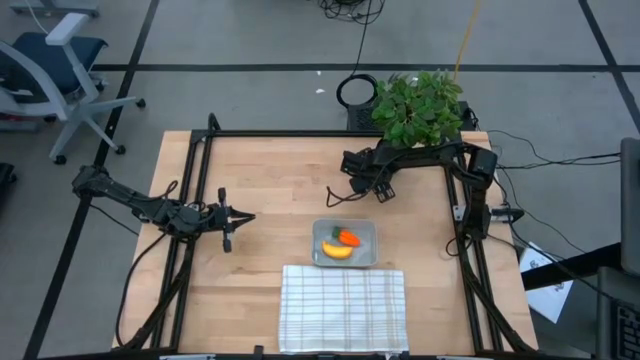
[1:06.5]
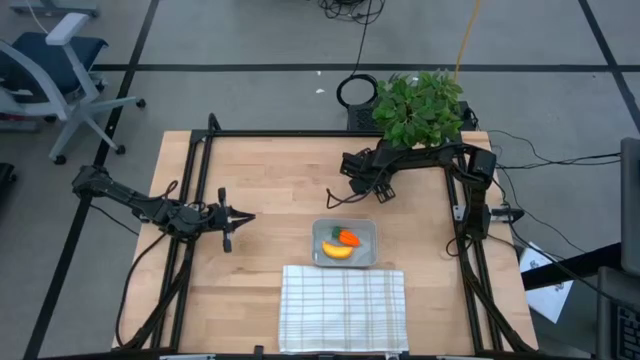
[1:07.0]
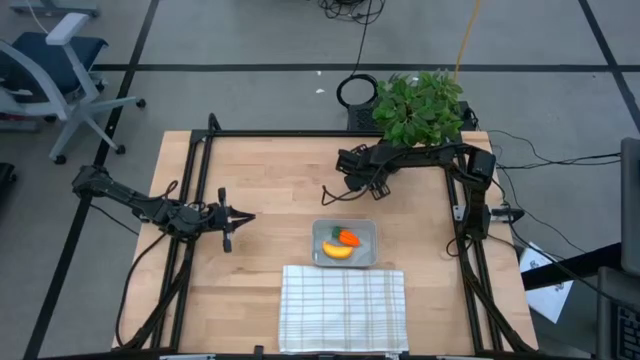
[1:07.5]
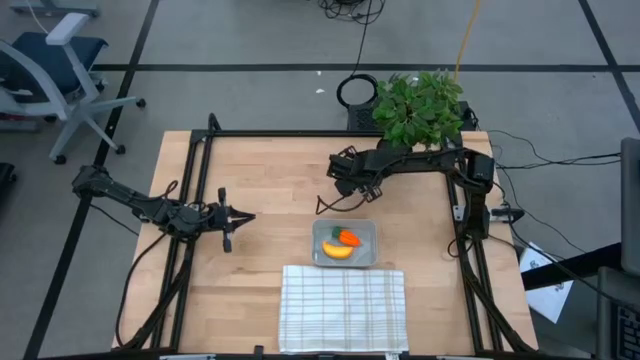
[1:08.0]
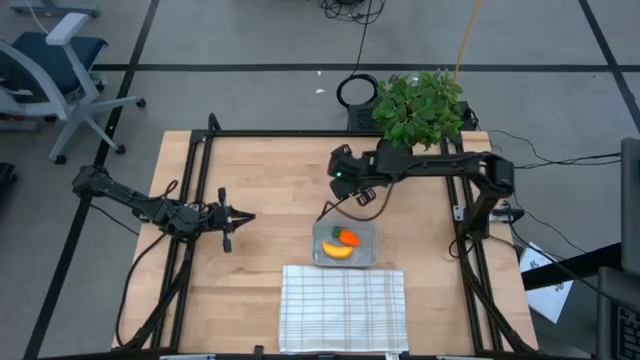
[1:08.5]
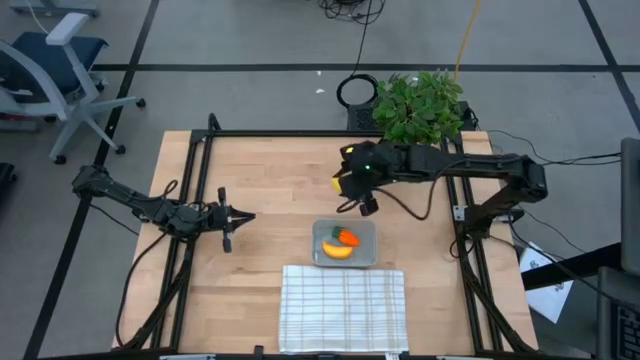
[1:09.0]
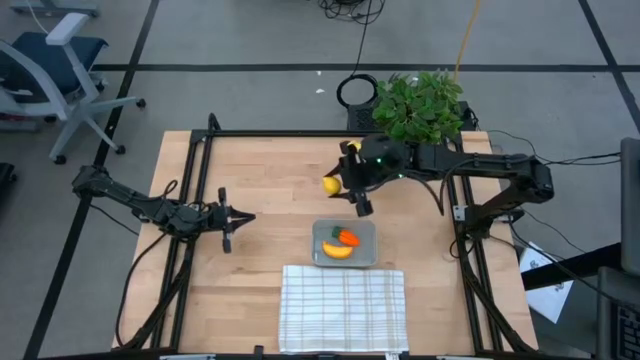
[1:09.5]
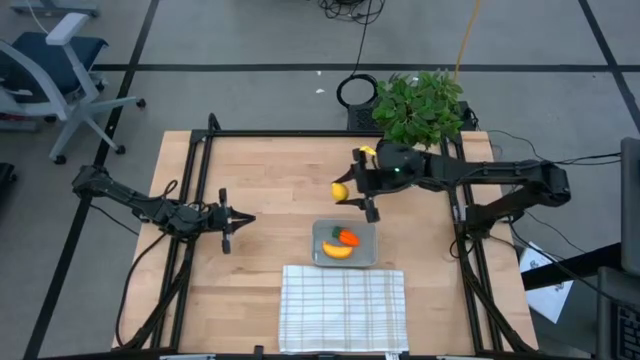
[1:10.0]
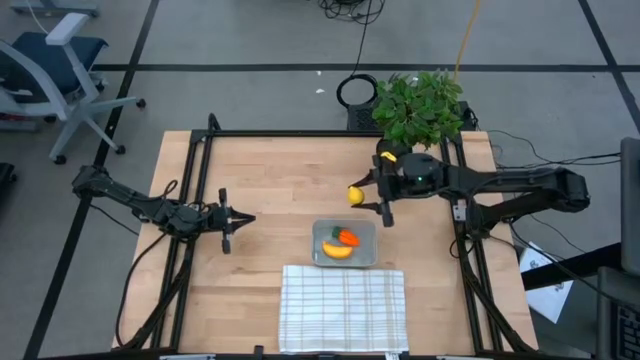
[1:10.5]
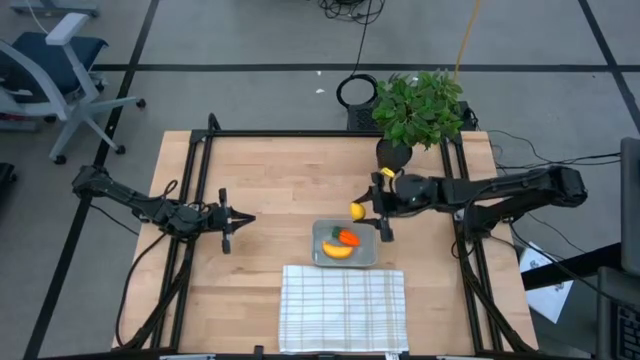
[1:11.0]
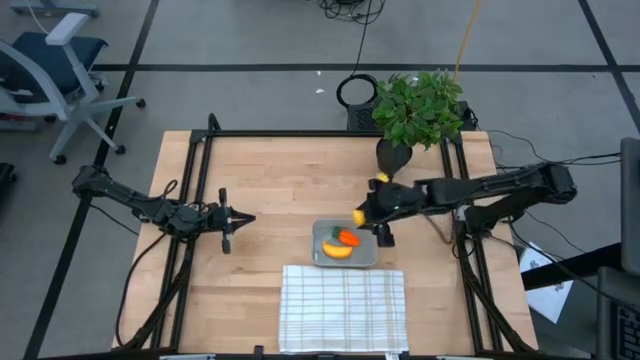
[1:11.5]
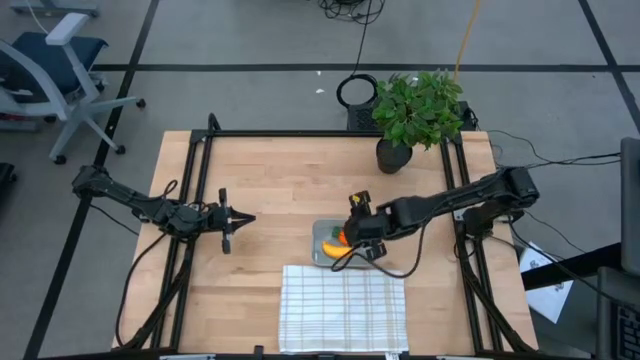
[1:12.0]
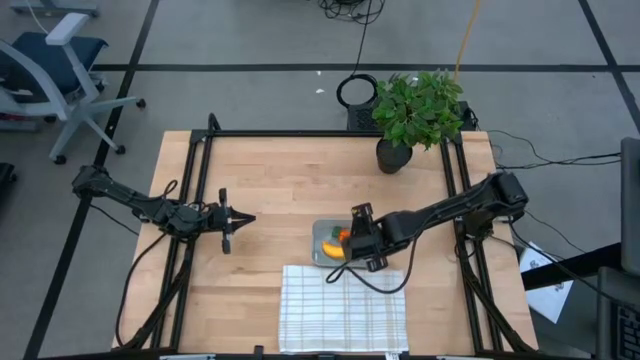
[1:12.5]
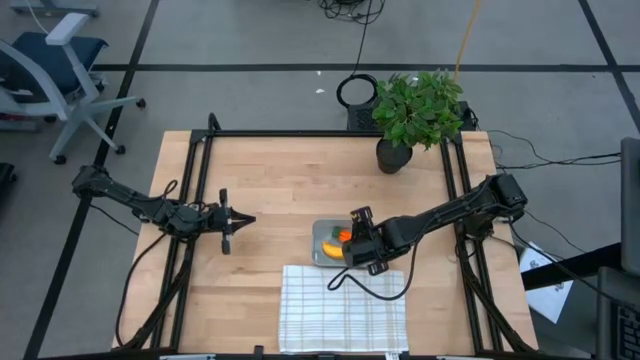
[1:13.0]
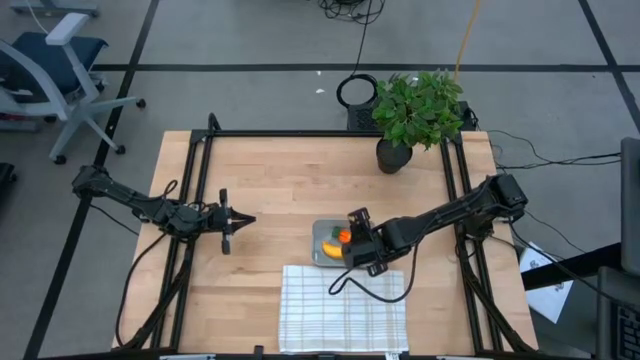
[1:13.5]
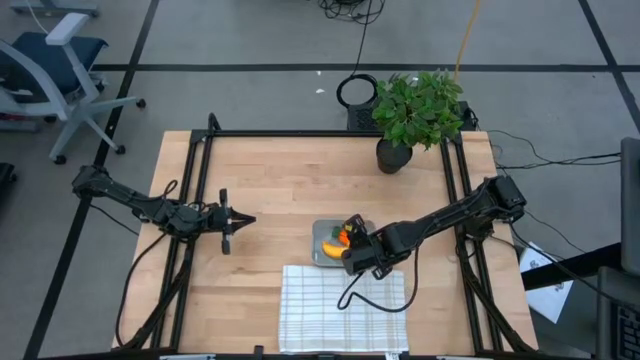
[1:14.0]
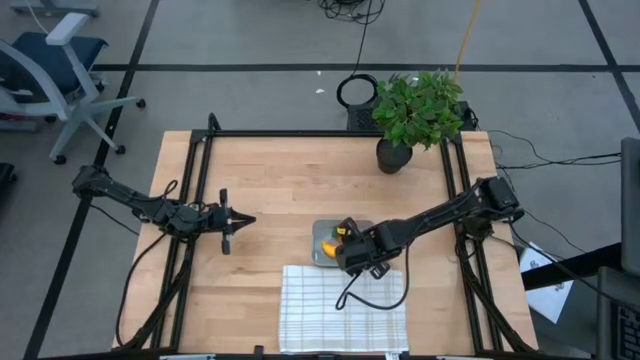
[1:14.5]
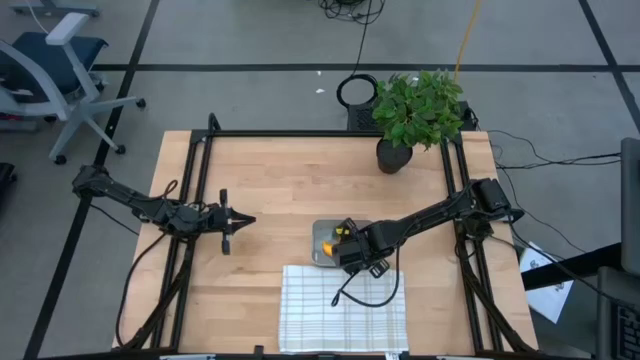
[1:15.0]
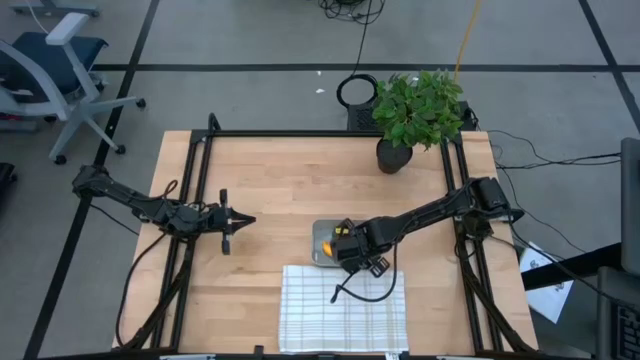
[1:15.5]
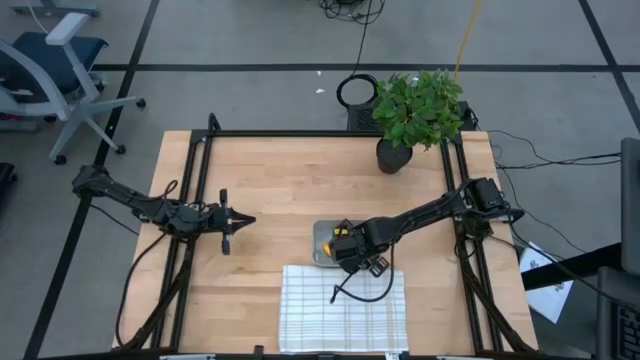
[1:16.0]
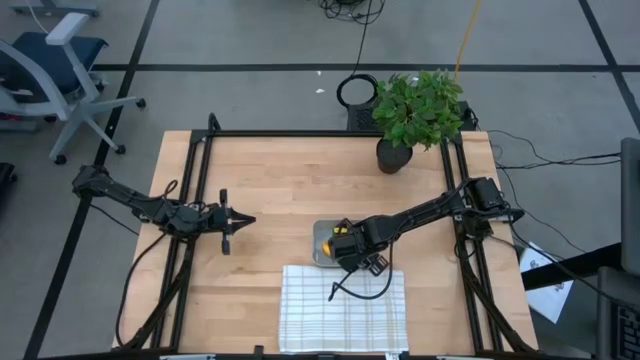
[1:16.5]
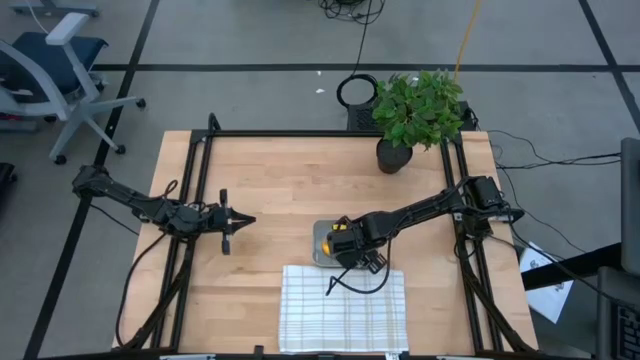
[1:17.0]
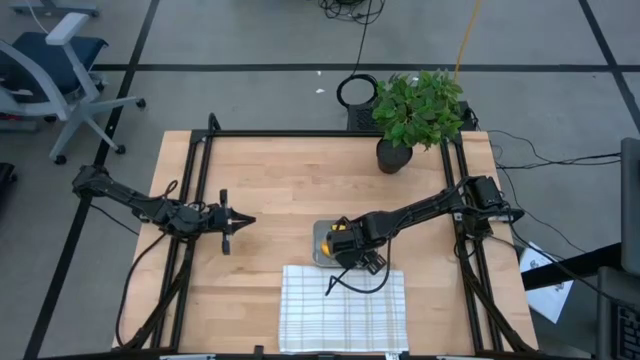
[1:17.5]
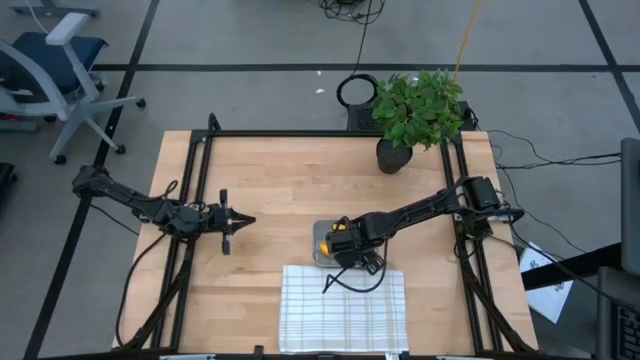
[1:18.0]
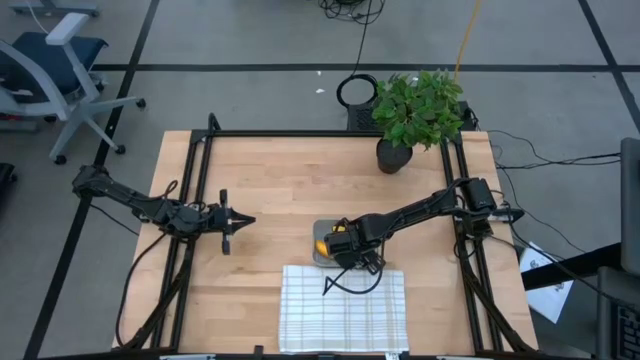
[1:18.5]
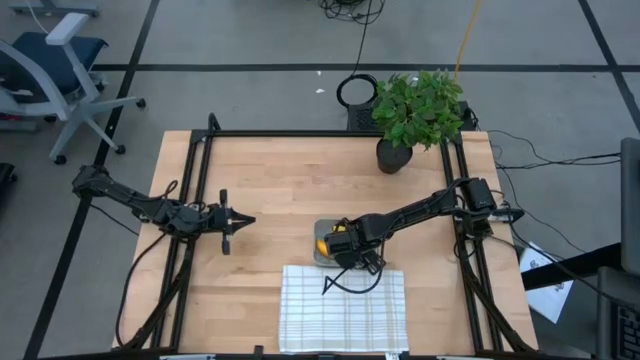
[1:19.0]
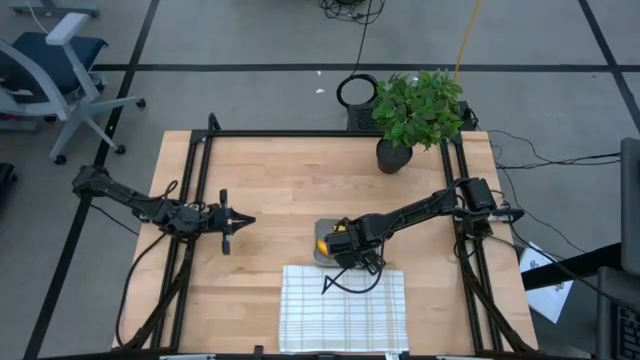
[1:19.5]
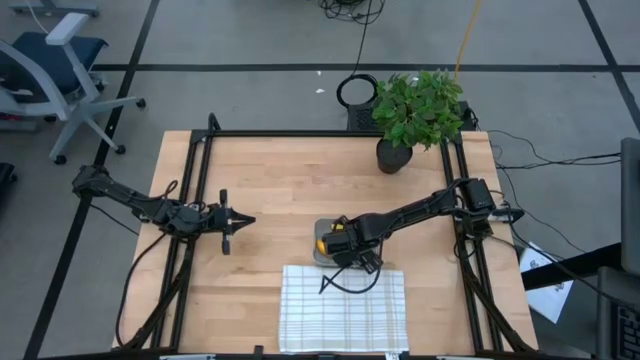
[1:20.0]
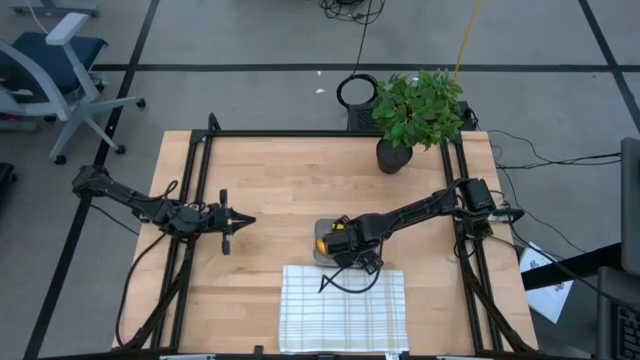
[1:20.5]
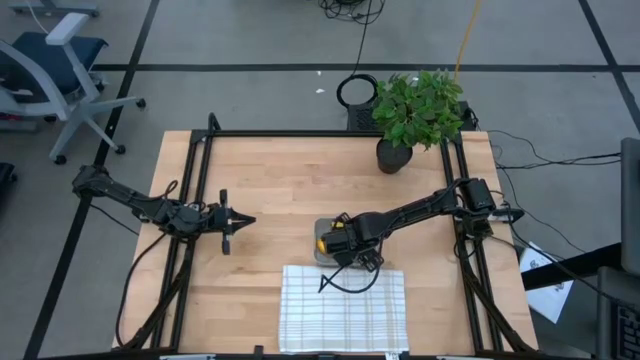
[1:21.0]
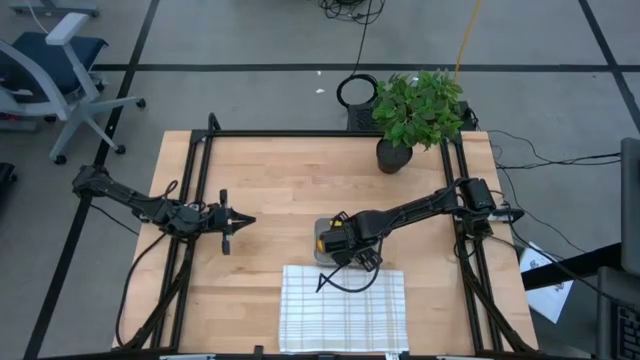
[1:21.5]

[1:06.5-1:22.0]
Task: Pick and placing Produce into tupperware
Put the yellow lemon into the gray bin

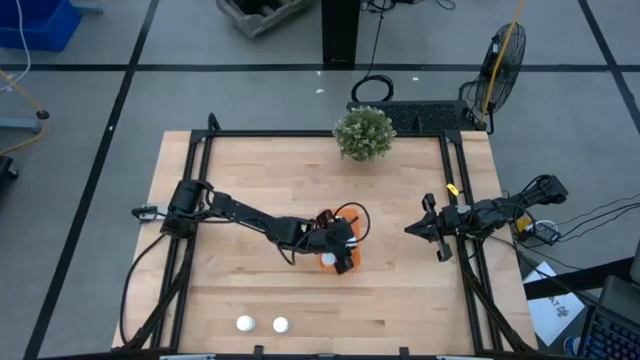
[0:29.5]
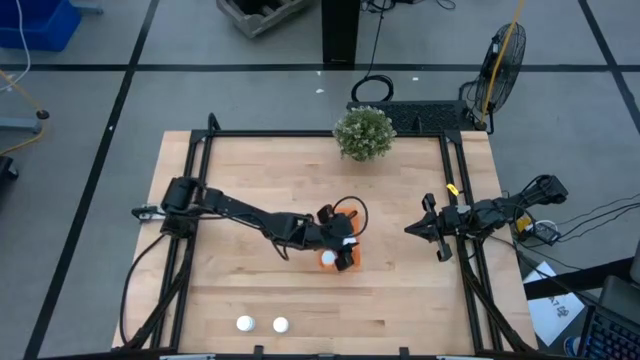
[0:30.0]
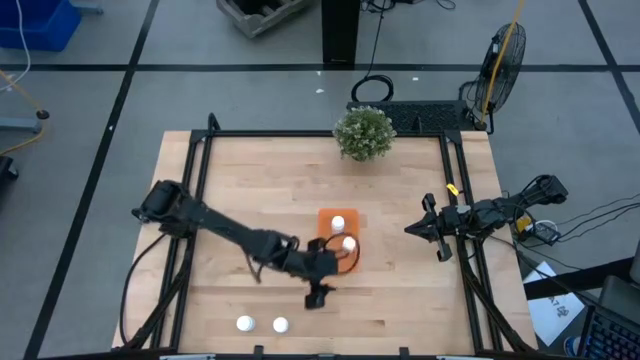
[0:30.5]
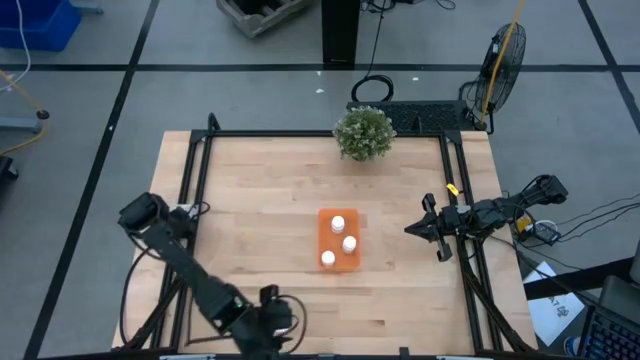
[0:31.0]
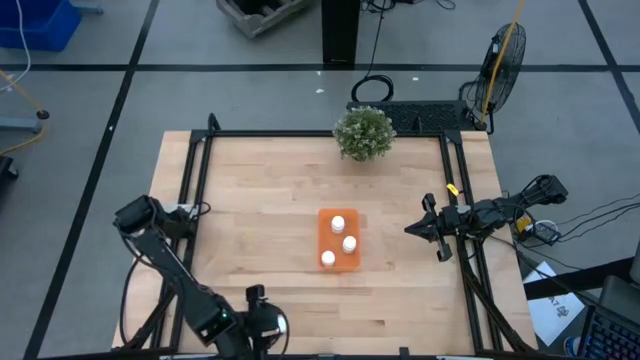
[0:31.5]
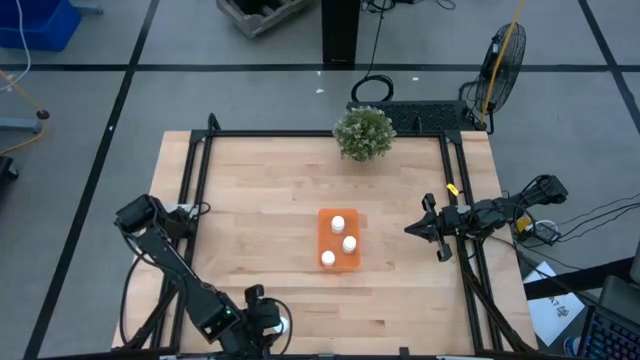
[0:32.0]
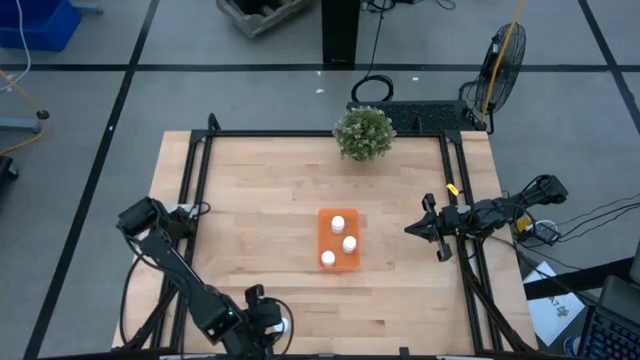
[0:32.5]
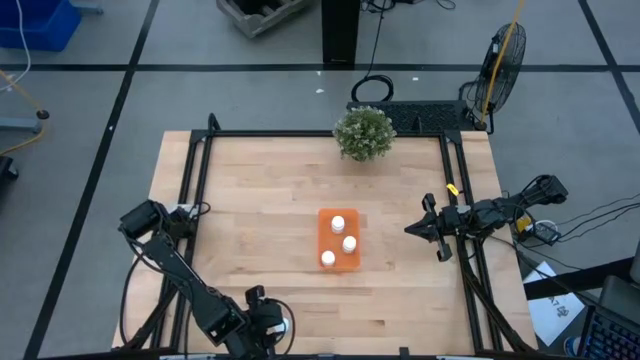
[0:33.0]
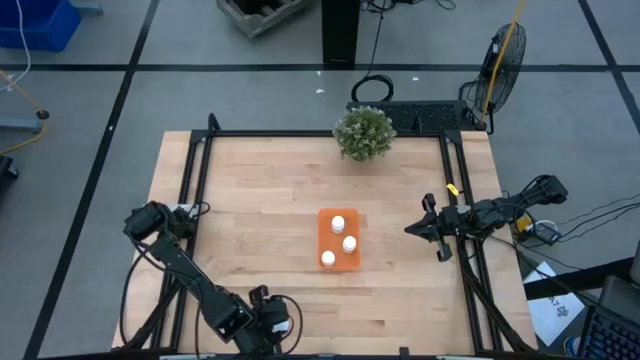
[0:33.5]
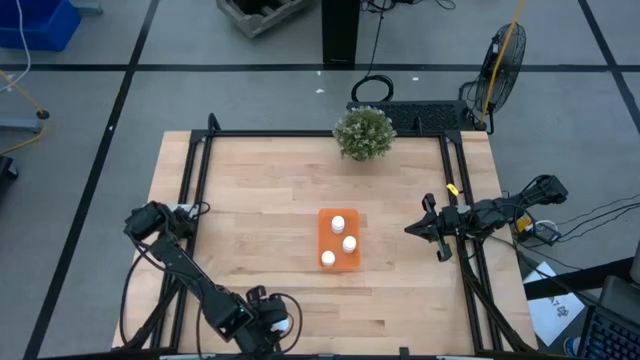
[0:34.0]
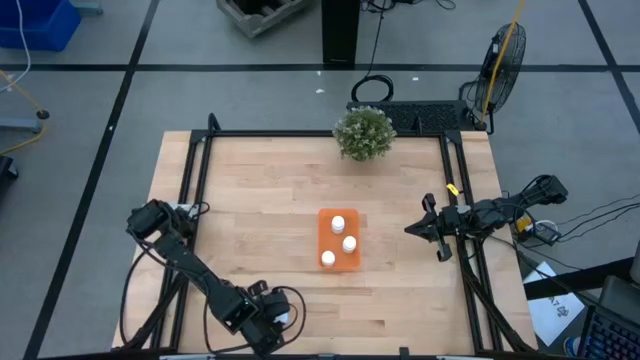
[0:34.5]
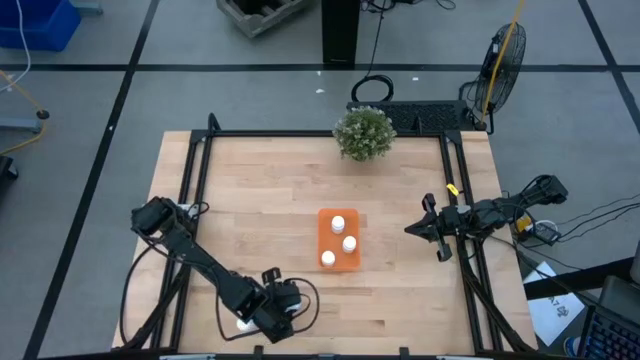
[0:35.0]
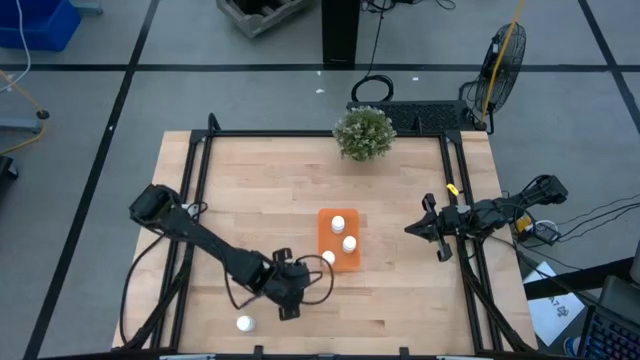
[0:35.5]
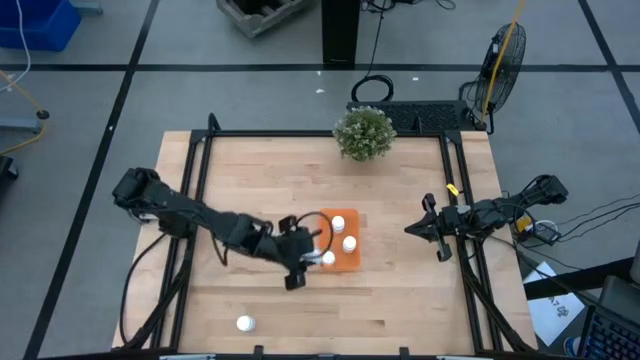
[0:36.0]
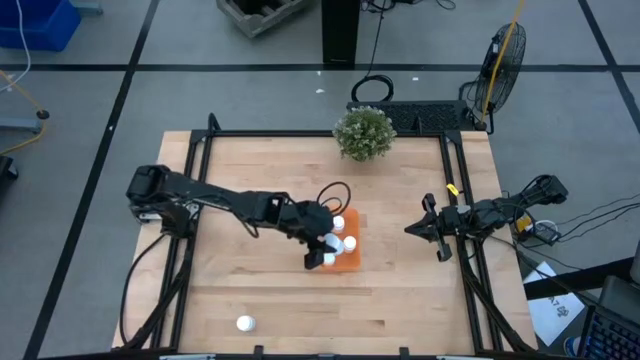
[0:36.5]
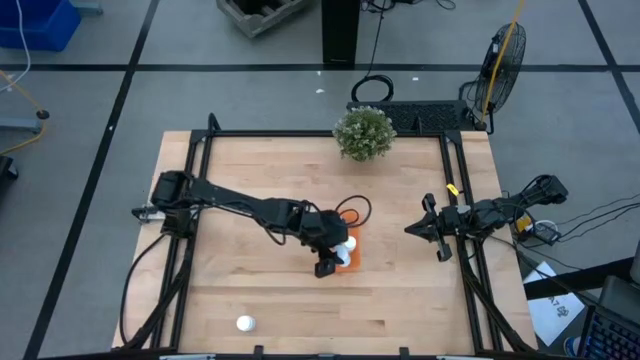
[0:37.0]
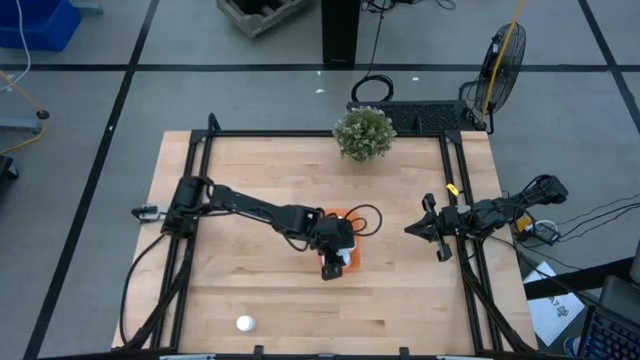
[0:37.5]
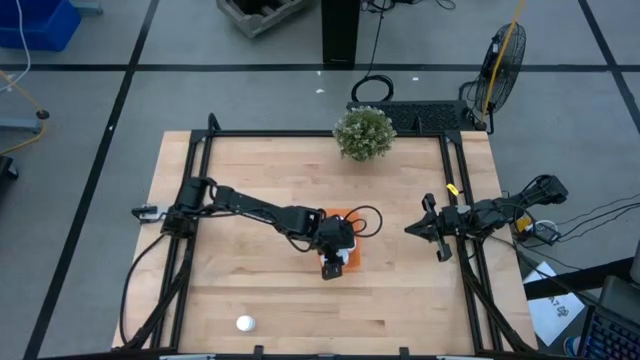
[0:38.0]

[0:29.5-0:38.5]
Task: Pick and place pill bottles into a basket
Put the white medicine bottle into the orange bin
